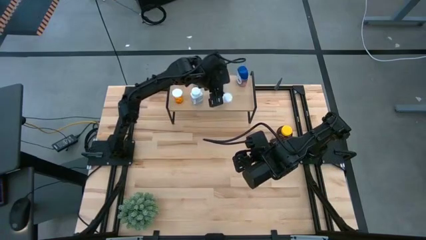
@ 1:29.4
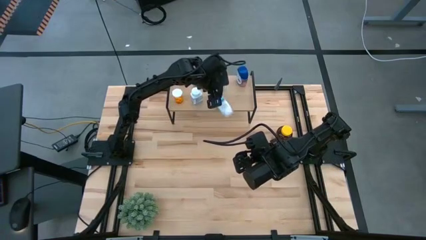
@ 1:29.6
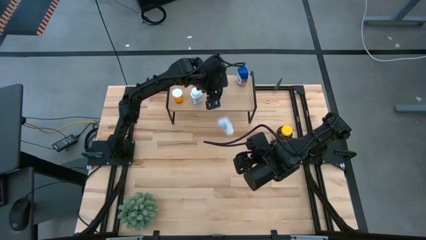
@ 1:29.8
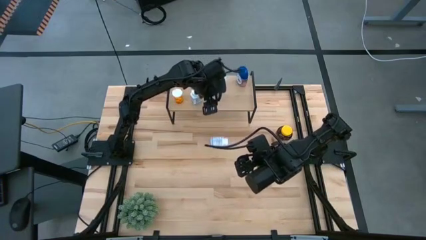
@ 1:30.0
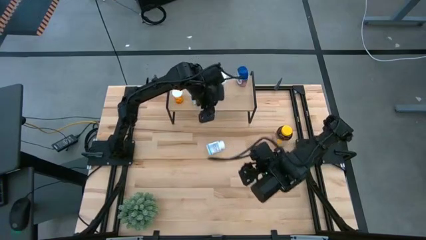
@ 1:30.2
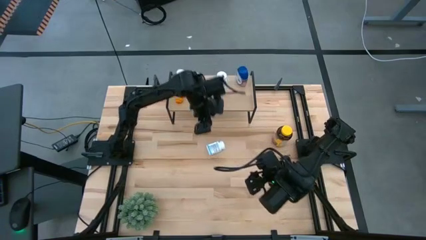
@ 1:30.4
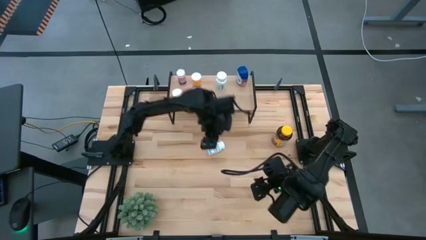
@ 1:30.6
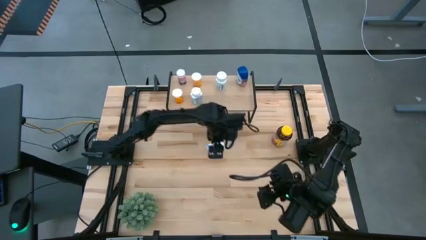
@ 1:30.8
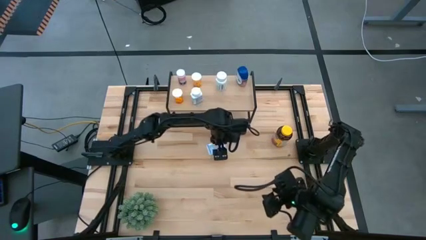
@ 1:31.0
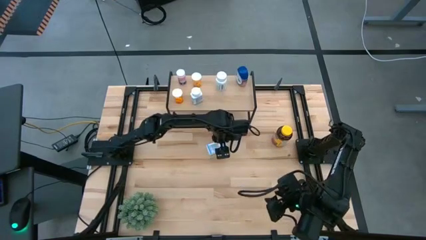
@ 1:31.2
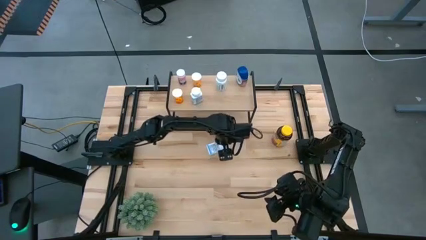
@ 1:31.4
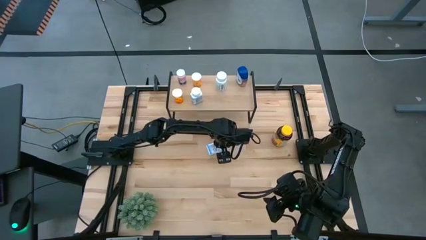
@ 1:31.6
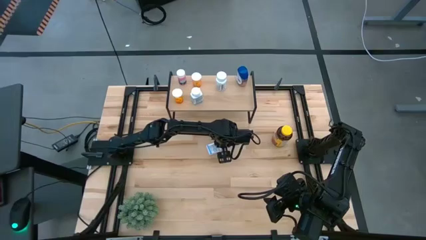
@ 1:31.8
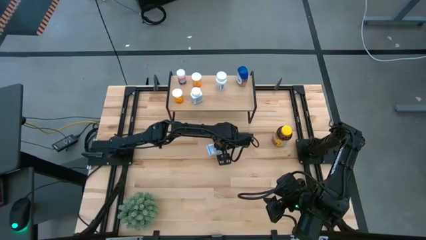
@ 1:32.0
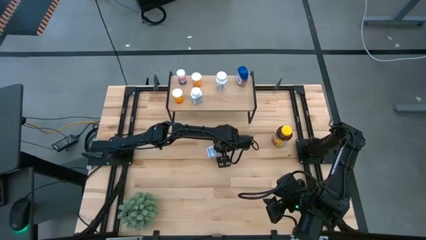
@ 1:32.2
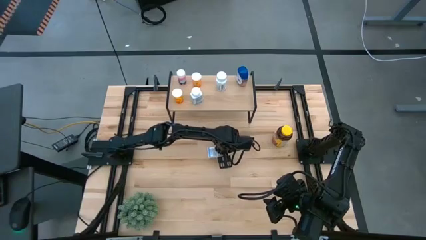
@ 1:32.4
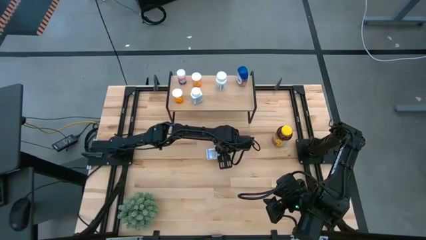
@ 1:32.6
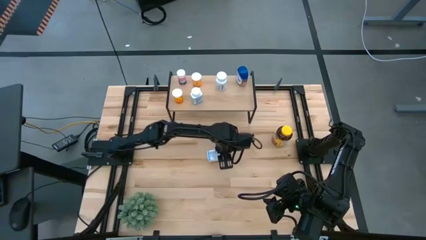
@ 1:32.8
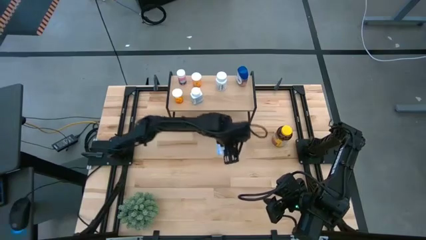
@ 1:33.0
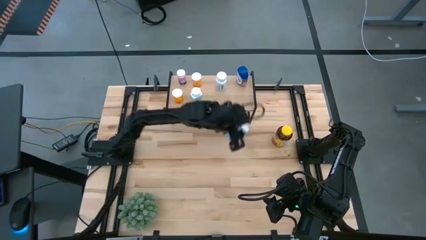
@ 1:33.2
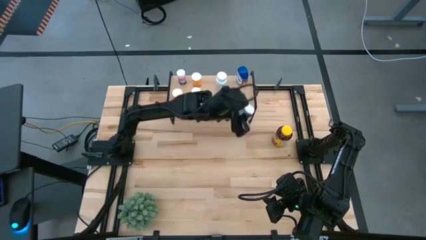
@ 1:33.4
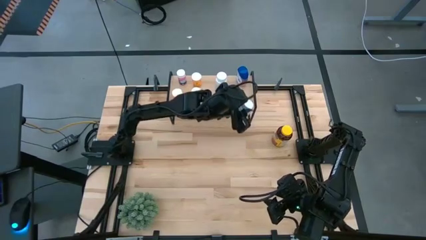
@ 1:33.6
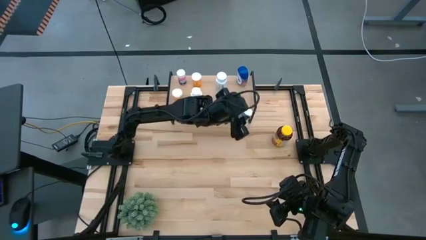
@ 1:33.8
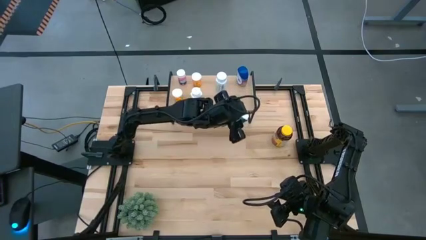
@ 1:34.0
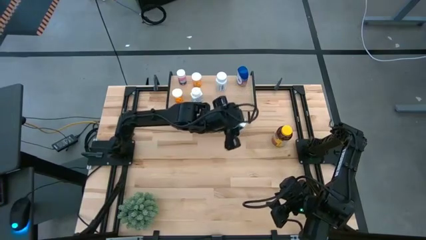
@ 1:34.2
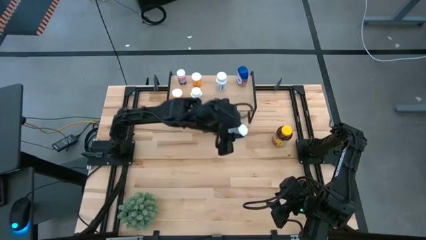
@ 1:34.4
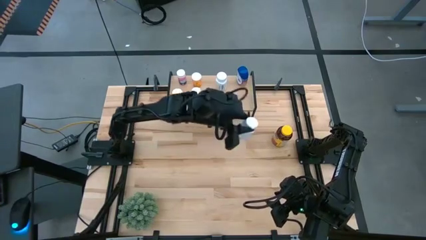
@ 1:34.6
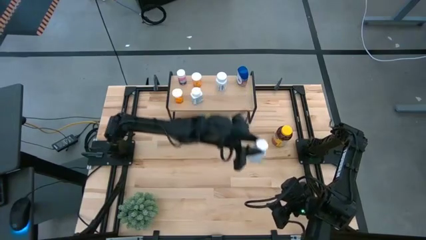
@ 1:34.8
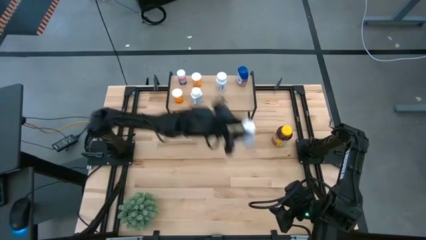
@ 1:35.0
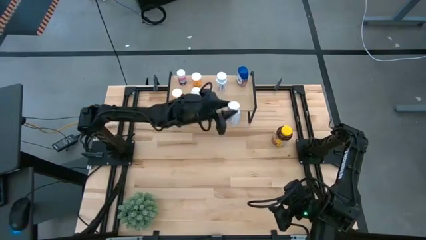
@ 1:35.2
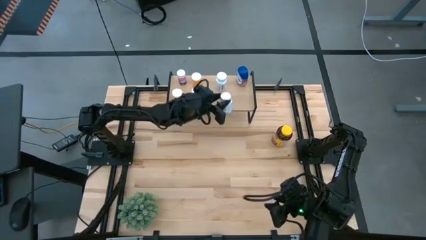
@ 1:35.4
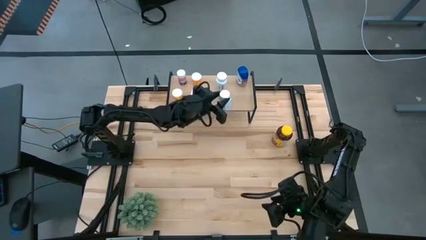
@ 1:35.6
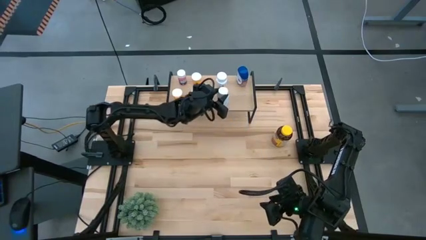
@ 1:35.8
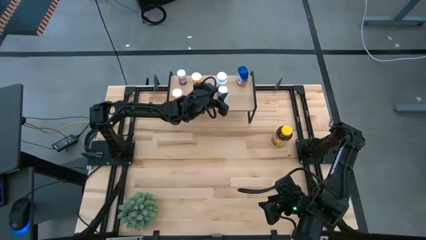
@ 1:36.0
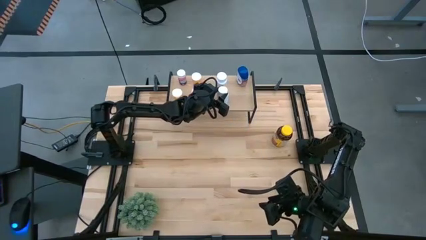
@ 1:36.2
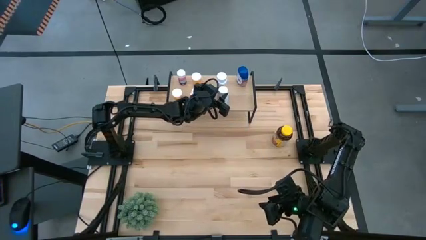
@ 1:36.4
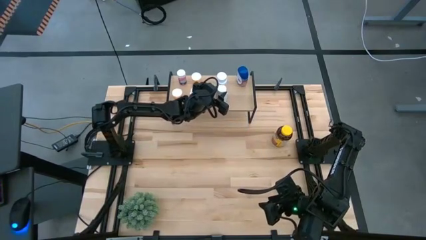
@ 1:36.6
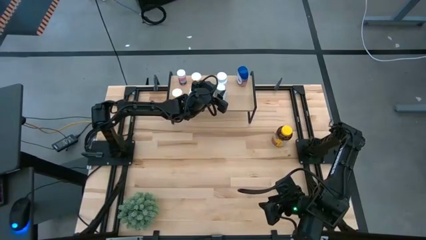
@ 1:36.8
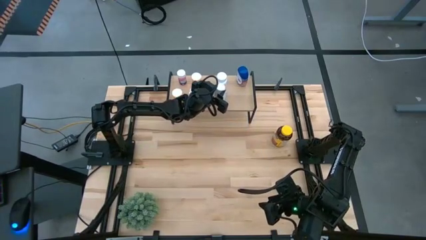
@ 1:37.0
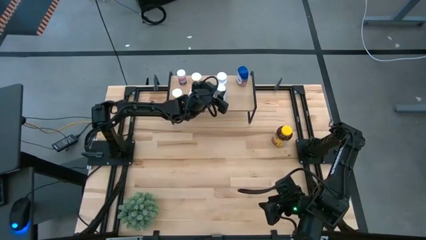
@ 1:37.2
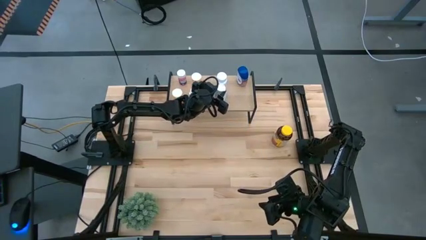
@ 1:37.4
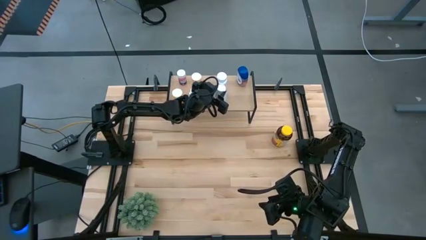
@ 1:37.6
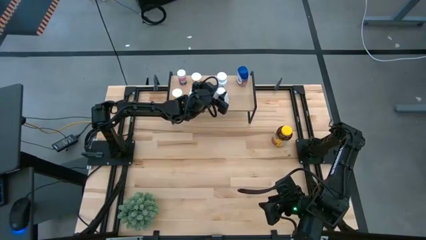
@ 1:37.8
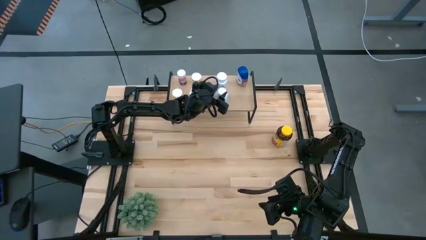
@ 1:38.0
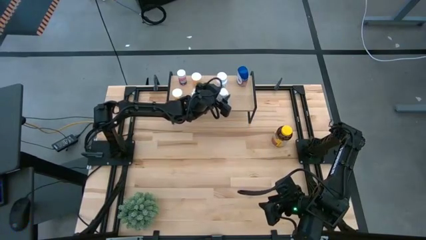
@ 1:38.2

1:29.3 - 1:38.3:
Task: Pick and place medicine bottles onto shelf by color
Put the white and blue medicine bottle on the shelf aligned with the other white medicine bottle

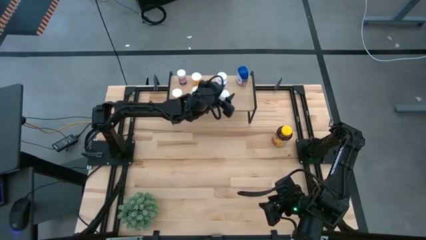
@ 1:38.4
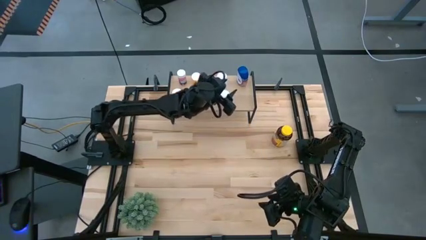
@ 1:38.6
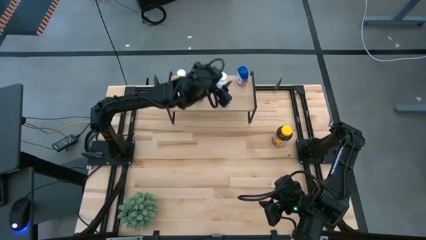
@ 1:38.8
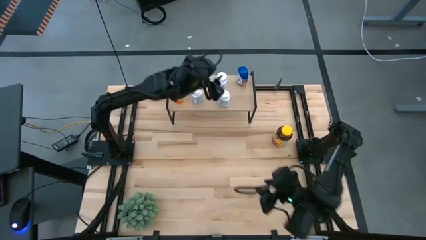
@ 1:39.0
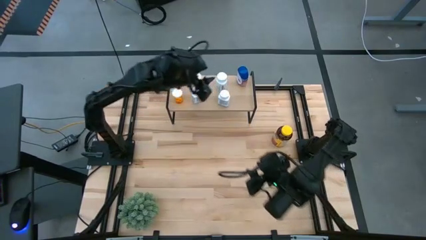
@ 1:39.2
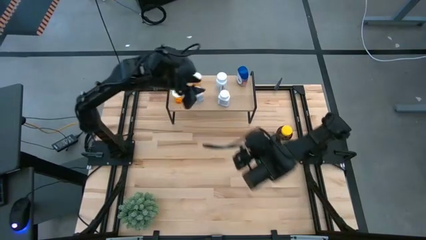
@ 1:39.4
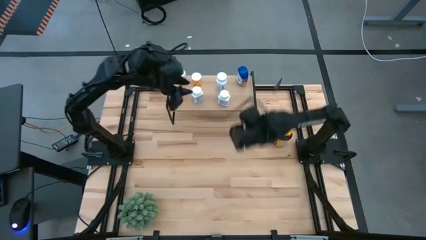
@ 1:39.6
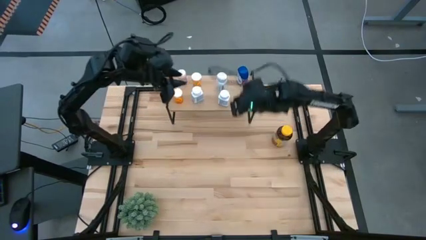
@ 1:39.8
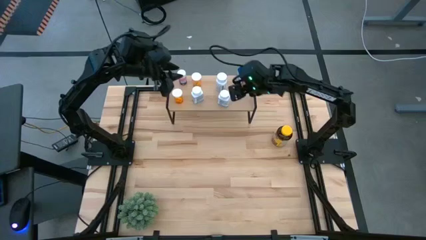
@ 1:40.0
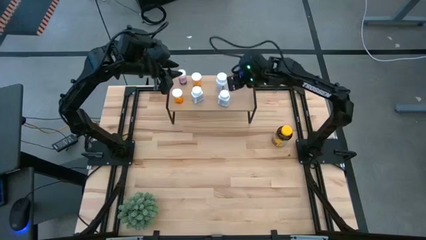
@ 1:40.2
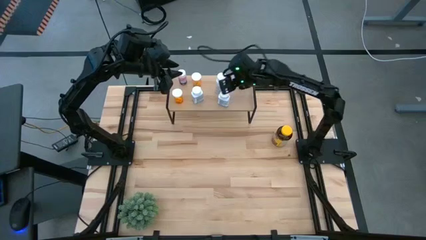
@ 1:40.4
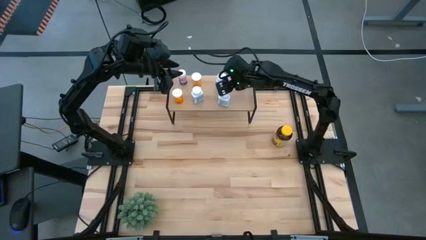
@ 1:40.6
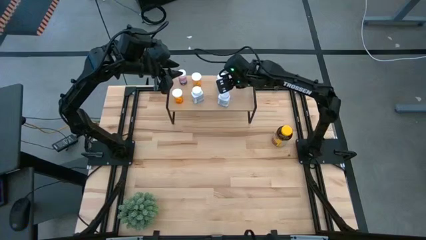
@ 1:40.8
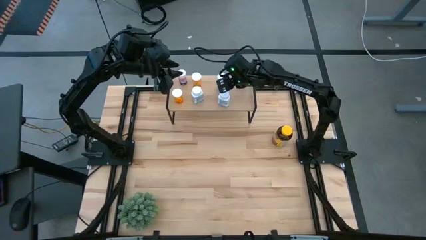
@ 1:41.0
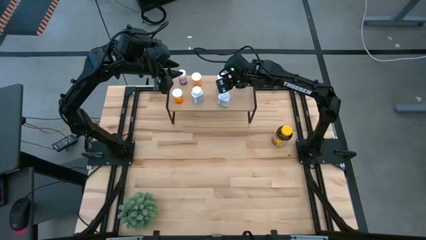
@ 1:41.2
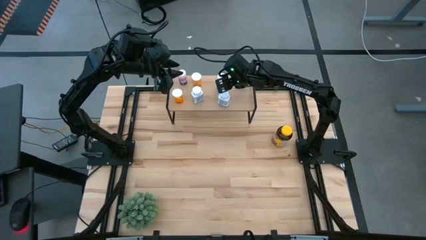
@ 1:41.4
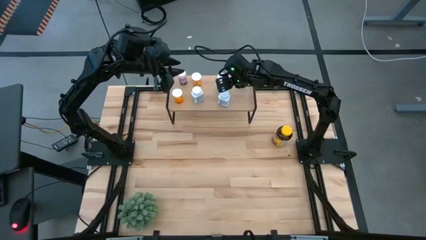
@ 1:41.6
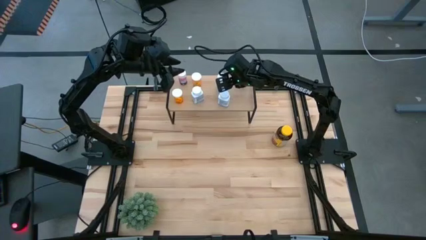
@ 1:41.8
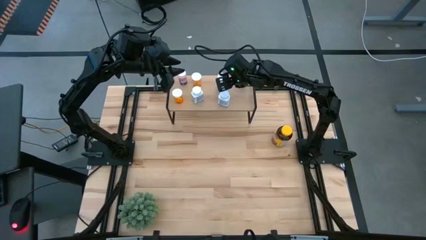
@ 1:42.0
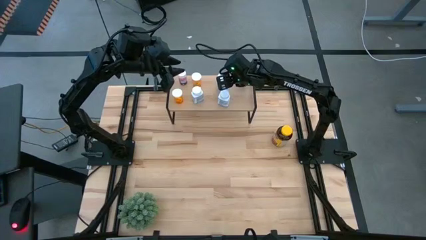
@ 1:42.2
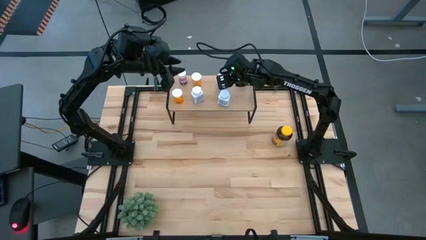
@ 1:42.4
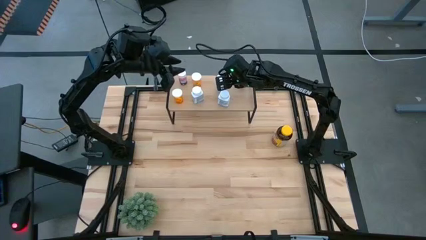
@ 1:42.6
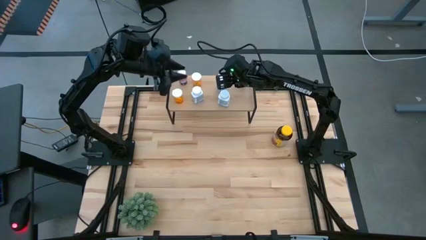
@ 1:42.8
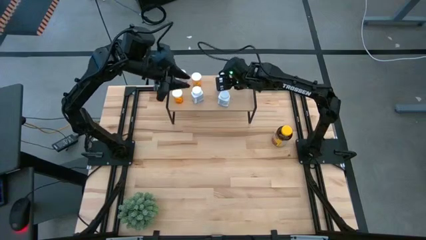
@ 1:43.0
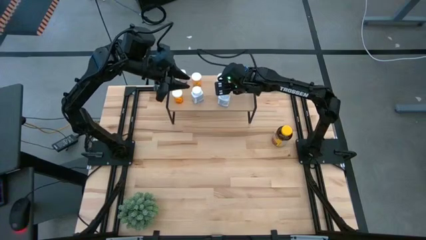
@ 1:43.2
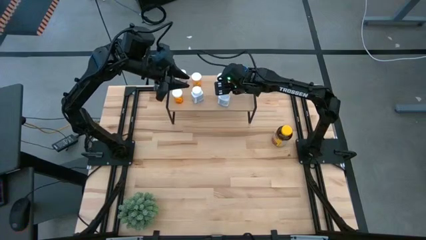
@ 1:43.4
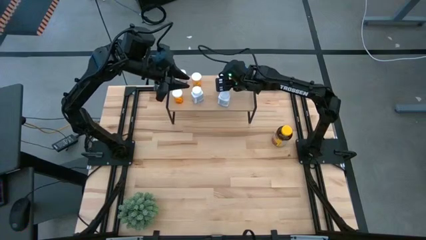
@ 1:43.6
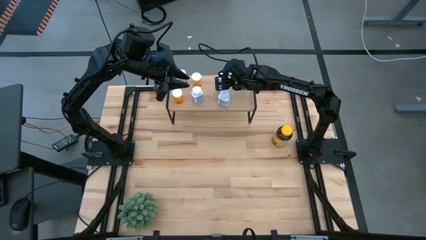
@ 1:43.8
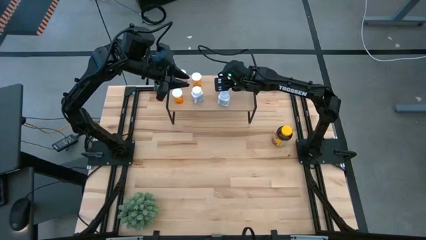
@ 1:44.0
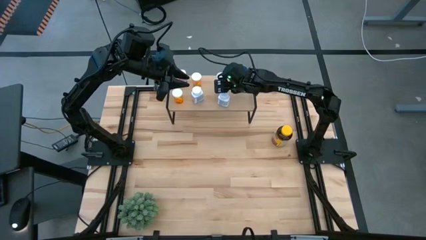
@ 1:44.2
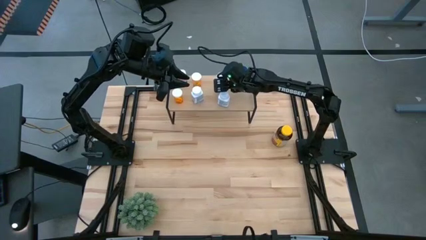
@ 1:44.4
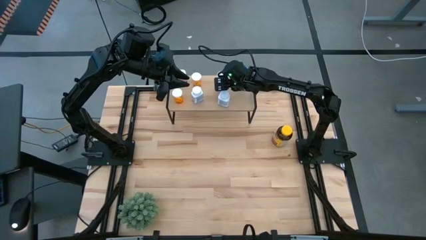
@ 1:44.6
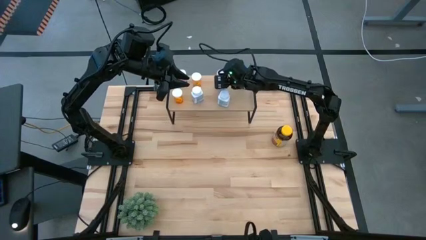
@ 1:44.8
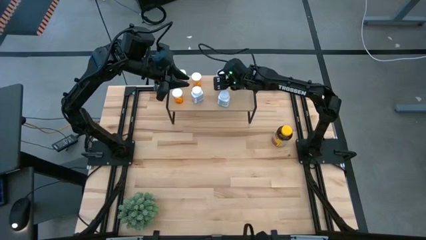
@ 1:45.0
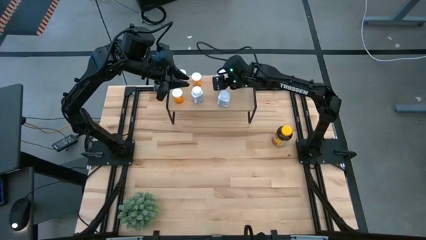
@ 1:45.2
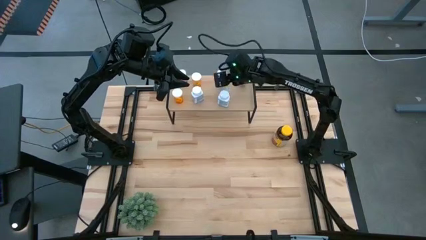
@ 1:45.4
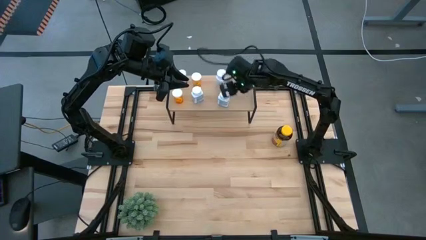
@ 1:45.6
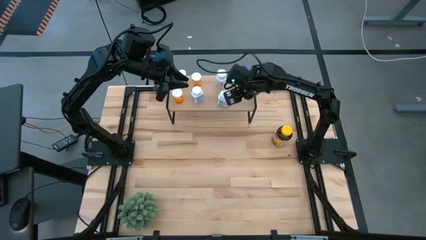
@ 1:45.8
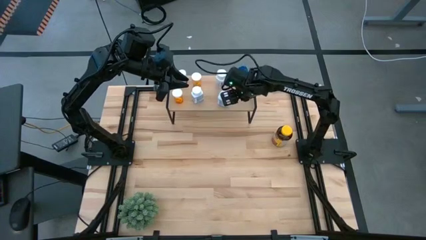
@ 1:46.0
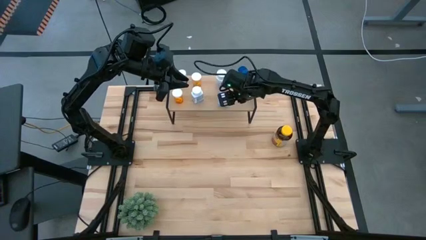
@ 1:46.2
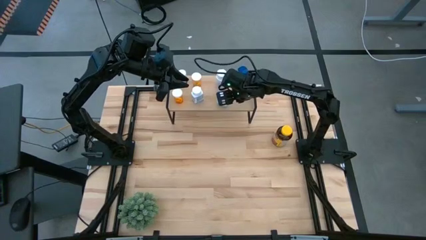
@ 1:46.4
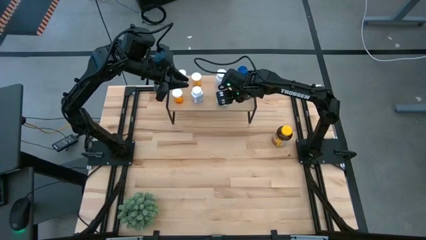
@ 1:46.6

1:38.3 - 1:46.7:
Adjust the medicine bottles on the shelf
